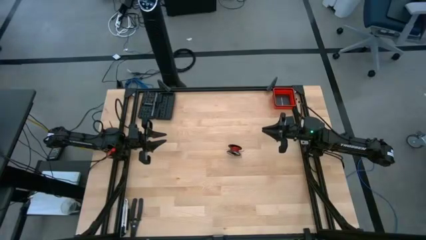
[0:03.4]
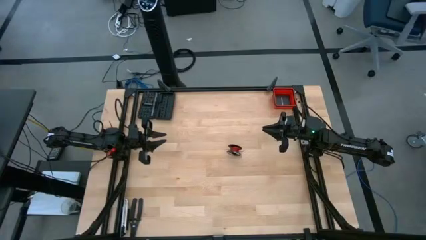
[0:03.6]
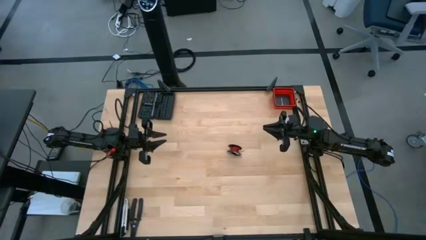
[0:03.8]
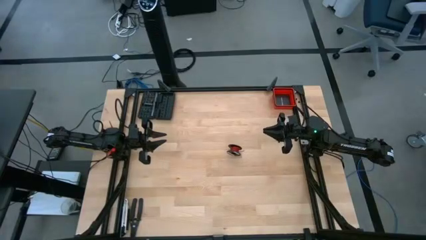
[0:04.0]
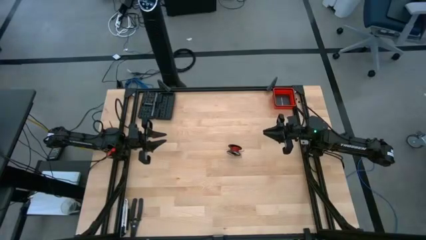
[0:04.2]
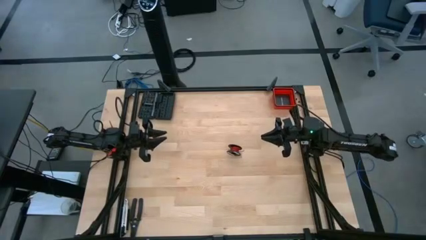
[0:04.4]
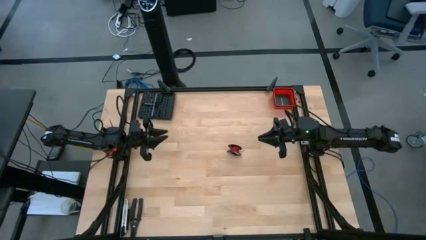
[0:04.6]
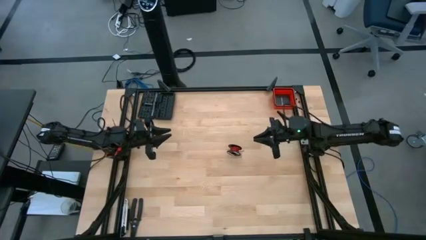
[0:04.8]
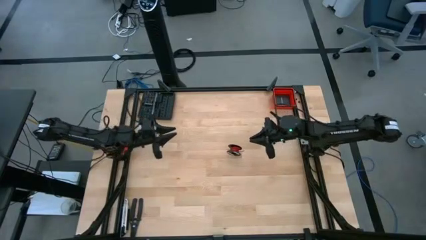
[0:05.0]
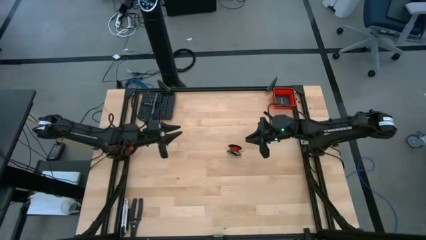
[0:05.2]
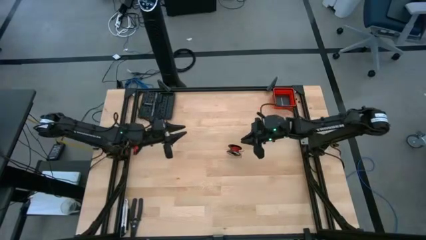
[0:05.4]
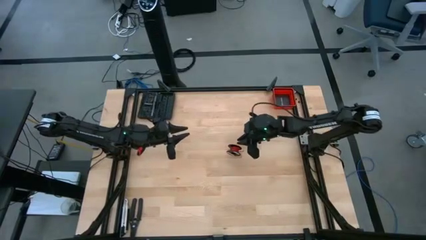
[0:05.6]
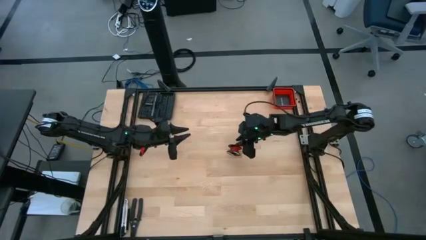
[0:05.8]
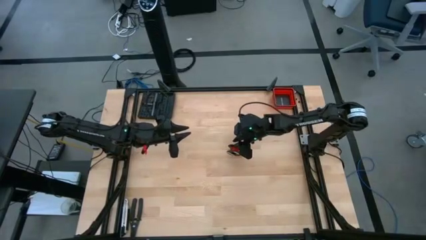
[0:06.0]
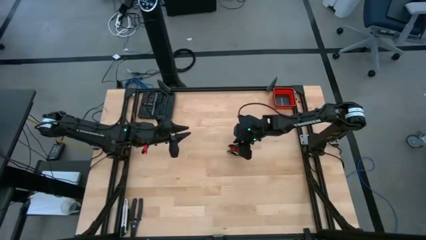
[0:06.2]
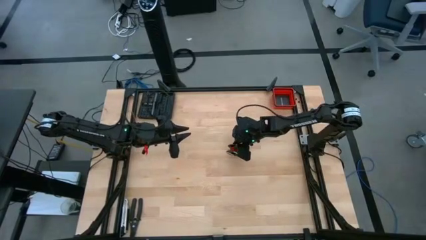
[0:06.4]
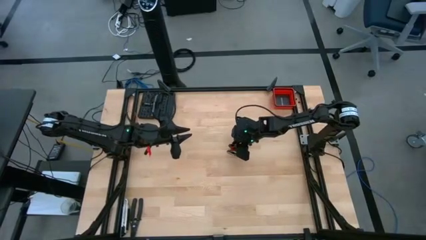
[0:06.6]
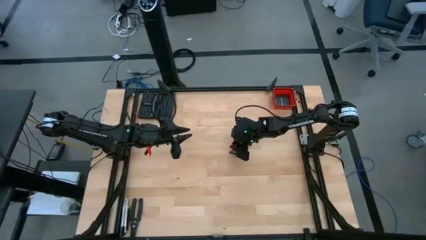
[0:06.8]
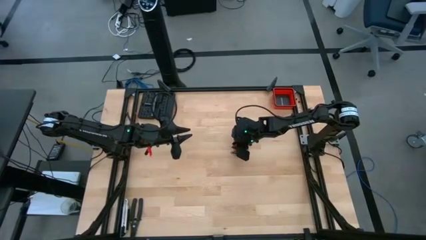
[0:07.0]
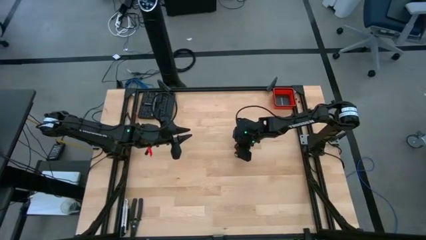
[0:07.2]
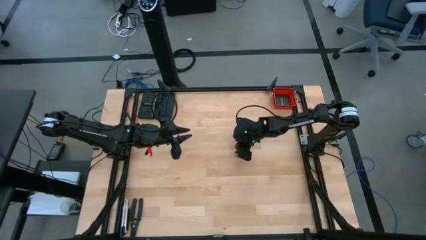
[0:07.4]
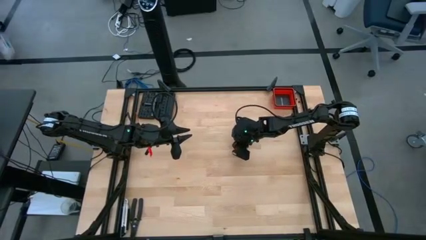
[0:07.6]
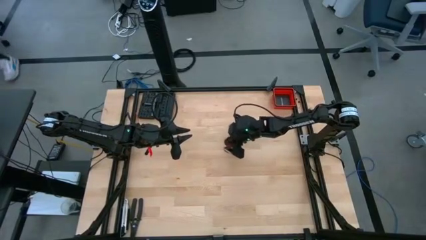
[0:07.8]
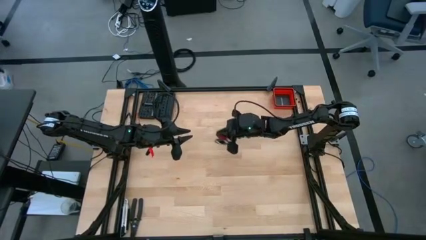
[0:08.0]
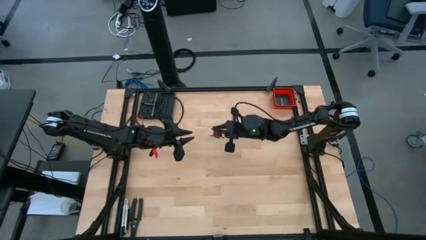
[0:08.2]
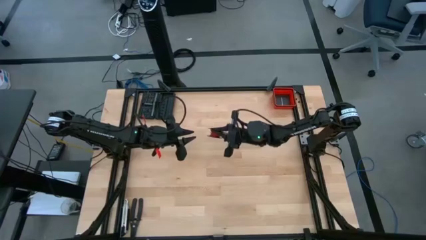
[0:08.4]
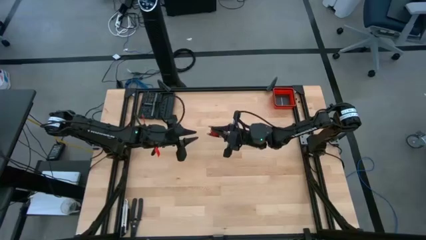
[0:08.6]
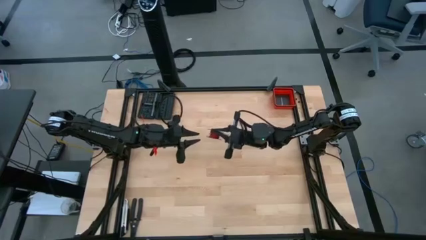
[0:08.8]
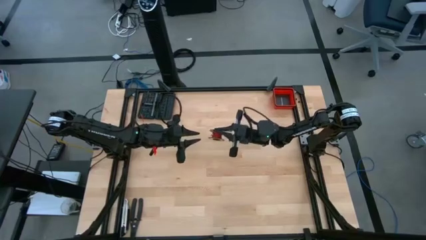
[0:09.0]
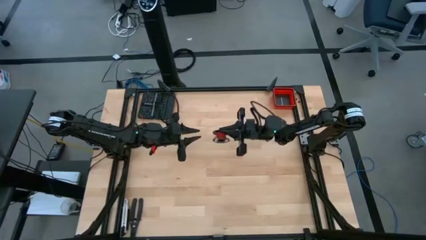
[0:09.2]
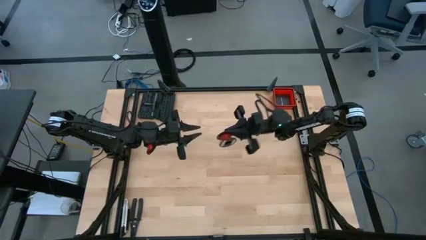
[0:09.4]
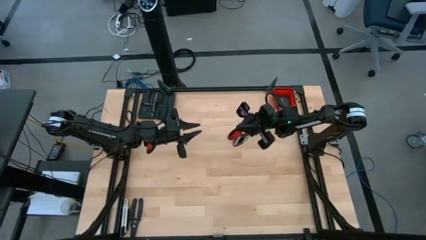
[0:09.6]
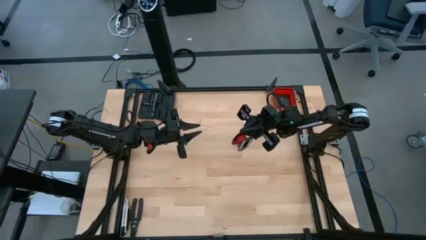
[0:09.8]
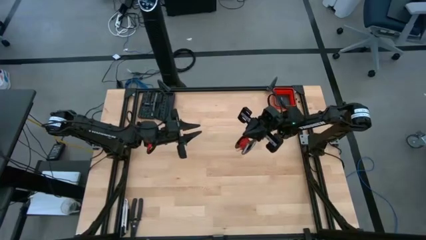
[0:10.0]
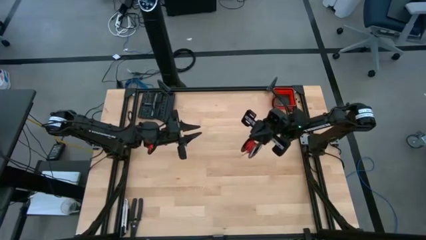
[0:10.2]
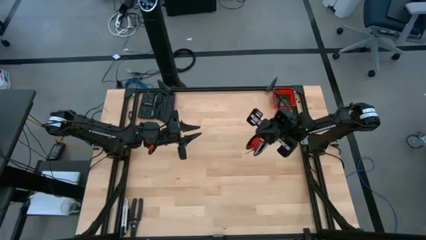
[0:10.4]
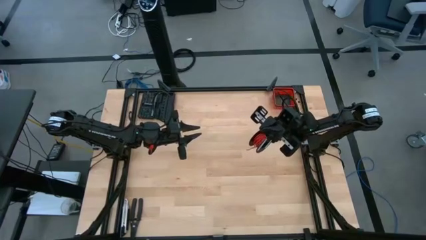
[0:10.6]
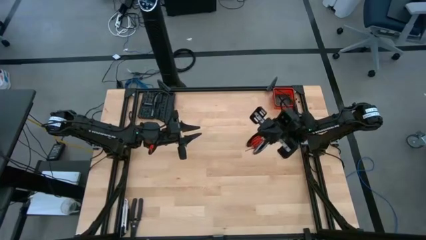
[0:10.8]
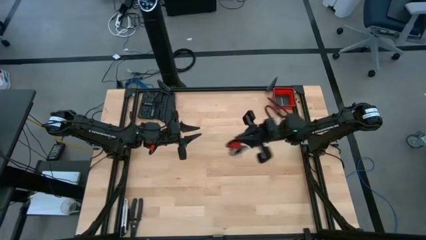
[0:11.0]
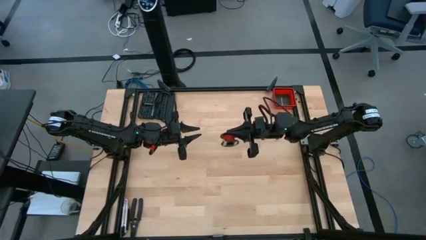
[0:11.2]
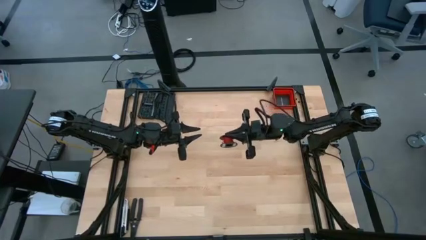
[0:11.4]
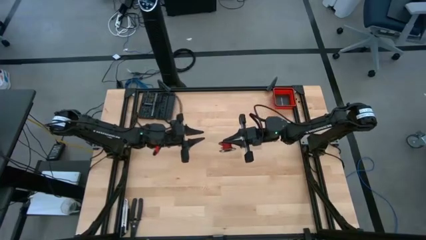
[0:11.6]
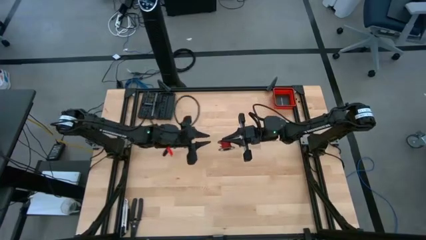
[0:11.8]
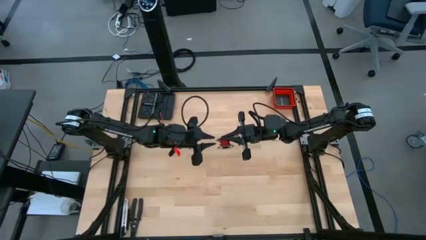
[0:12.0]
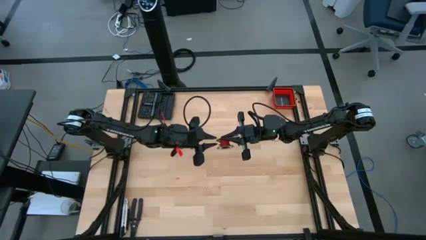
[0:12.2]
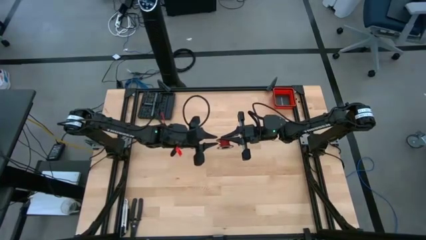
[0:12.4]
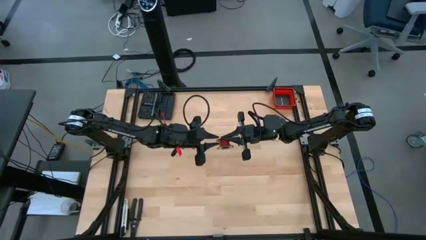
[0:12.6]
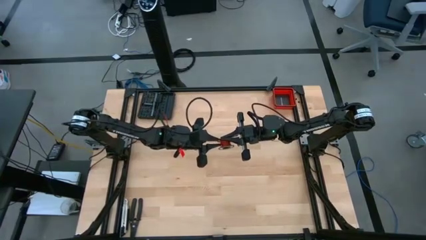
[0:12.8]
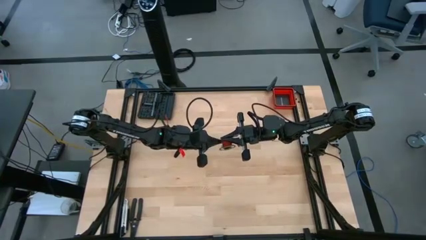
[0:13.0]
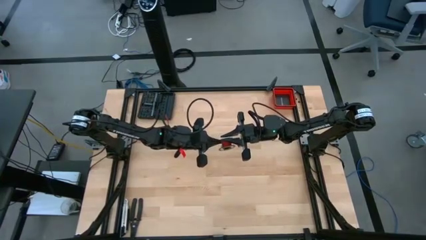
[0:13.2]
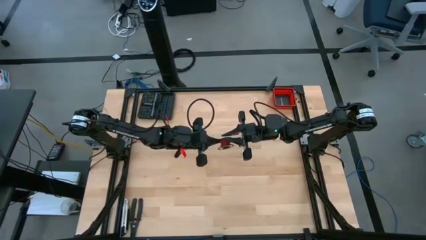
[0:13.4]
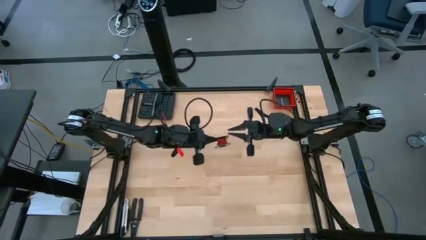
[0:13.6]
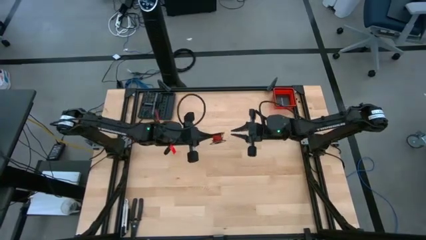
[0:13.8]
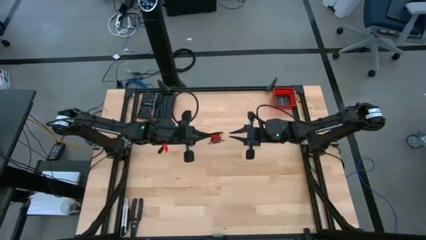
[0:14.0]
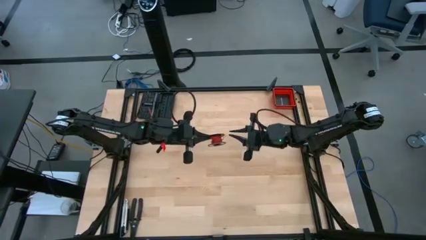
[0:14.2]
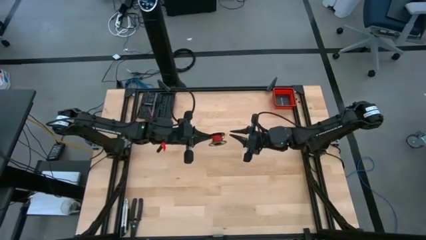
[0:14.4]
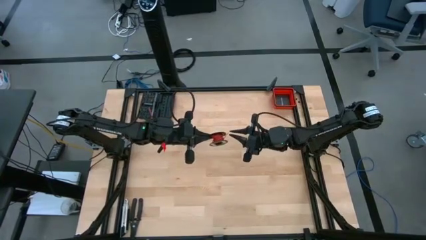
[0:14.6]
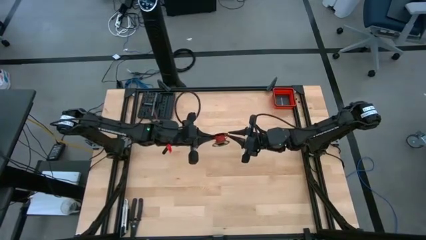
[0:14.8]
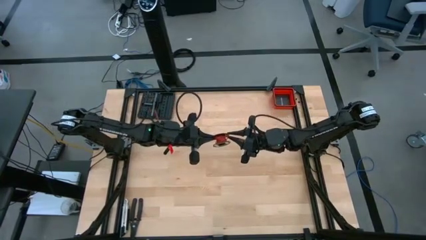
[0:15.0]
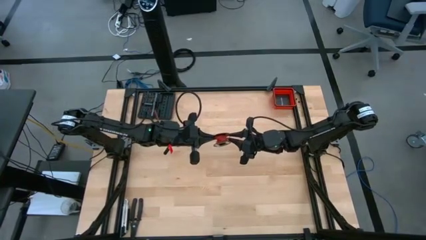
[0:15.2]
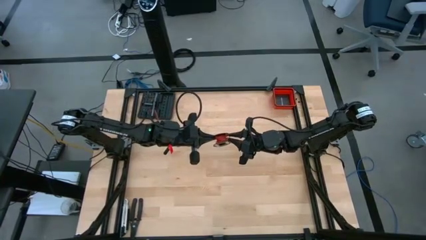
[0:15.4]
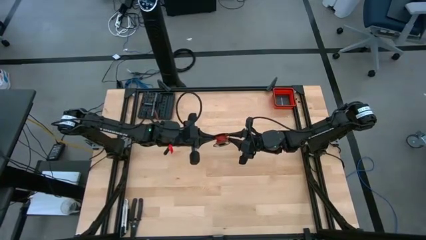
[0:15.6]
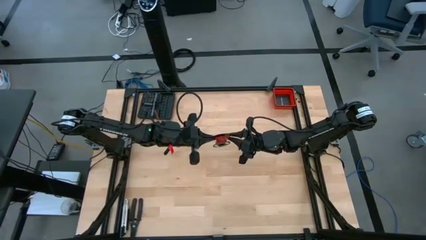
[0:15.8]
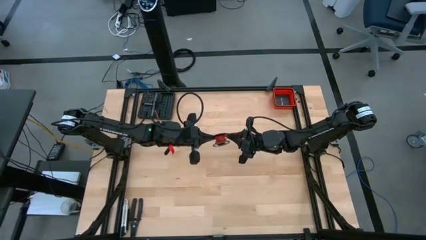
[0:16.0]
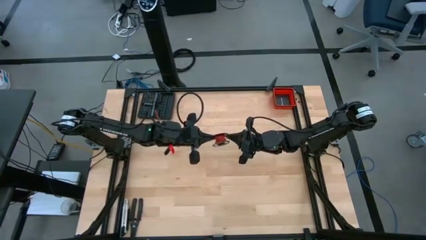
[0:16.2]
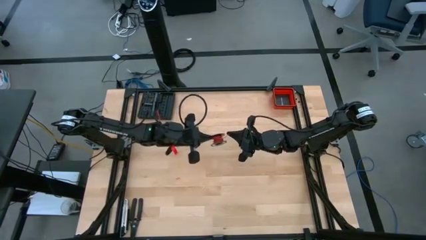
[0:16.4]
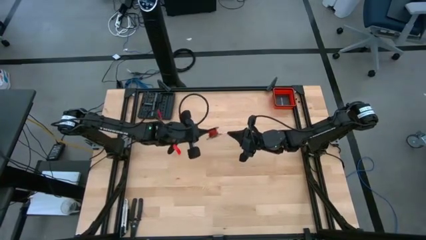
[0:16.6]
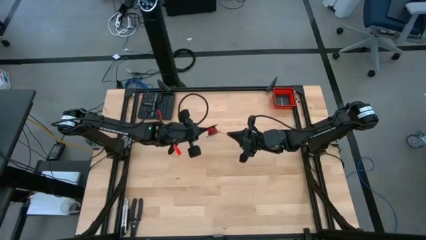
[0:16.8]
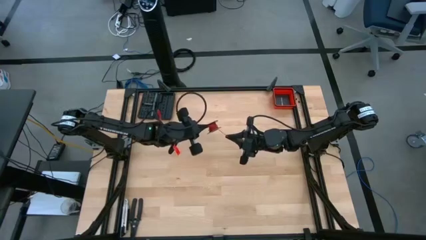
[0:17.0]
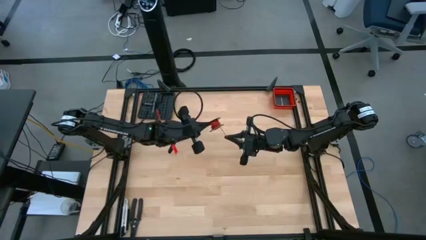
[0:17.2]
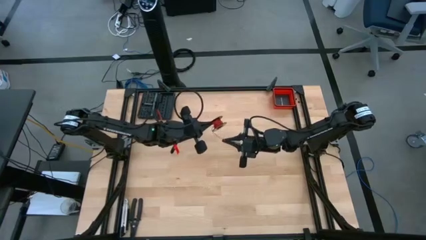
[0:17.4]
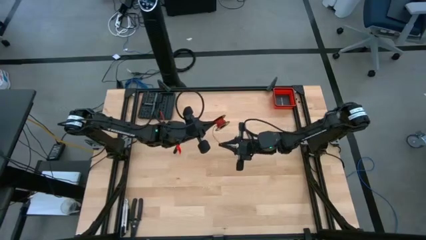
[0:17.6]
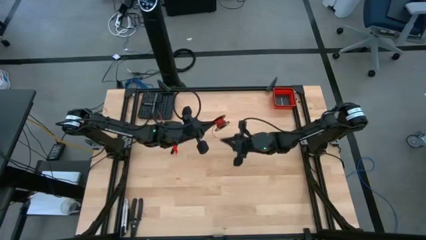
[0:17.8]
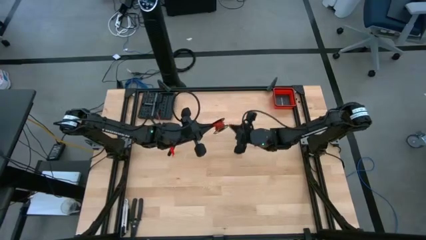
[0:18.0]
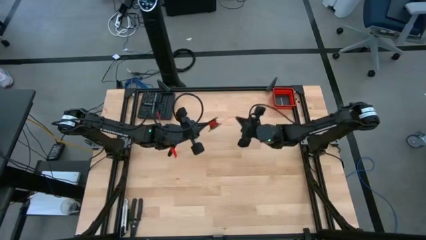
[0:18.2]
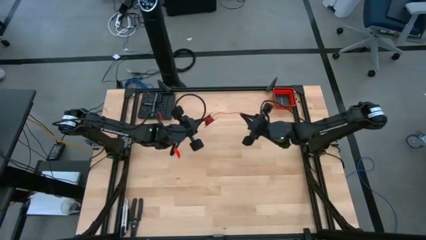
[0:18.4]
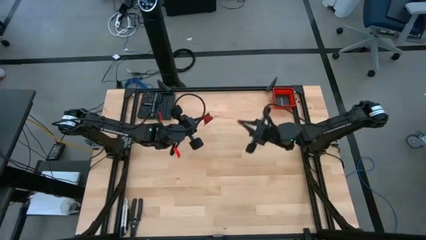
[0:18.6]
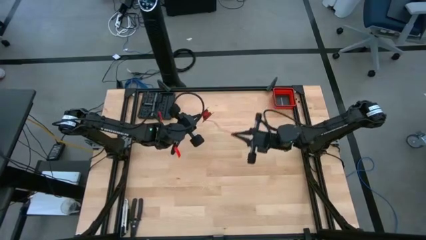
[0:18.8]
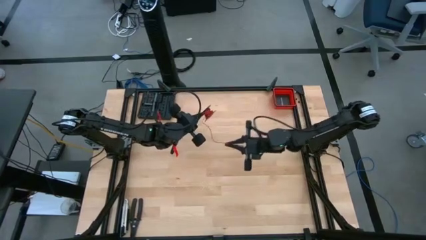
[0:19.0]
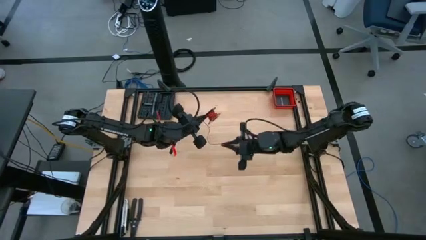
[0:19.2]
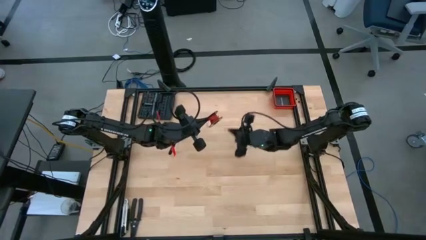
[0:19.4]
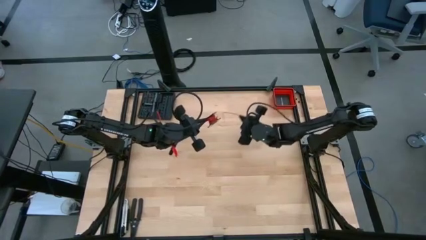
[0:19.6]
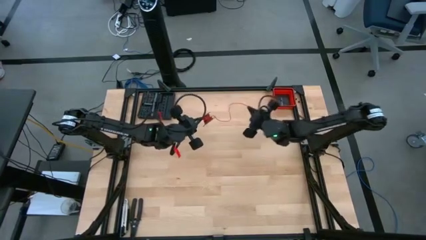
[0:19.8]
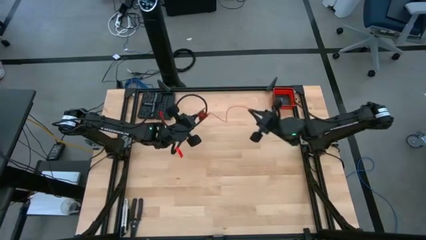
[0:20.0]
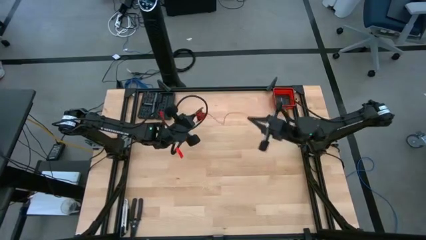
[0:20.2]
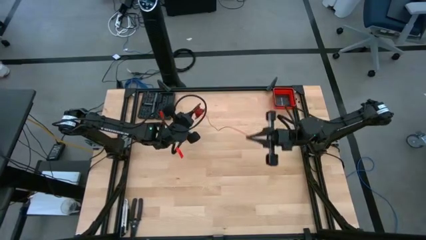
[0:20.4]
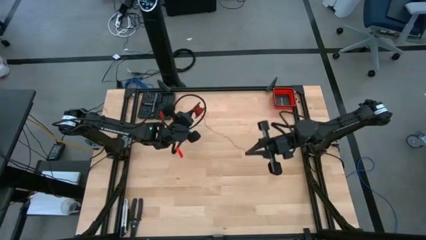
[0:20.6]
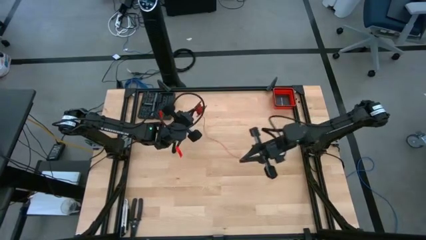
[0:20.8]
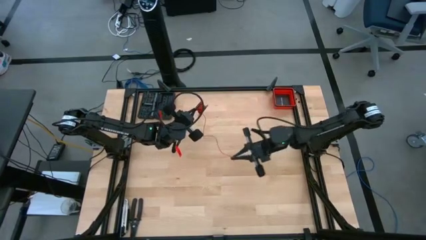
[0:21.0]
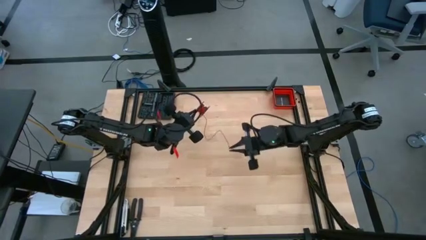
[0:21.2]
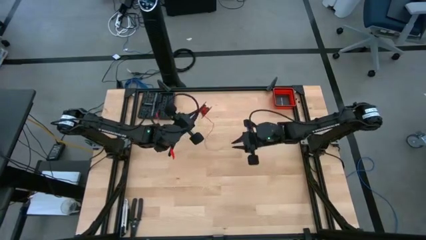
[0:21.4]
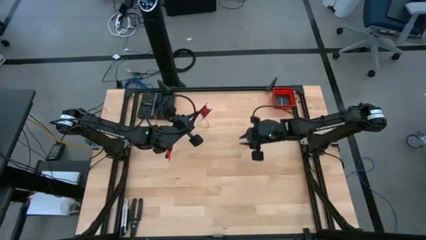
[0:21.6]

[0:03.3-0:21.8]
Task: Coil cords
Uncoil the red wire from the black spool
